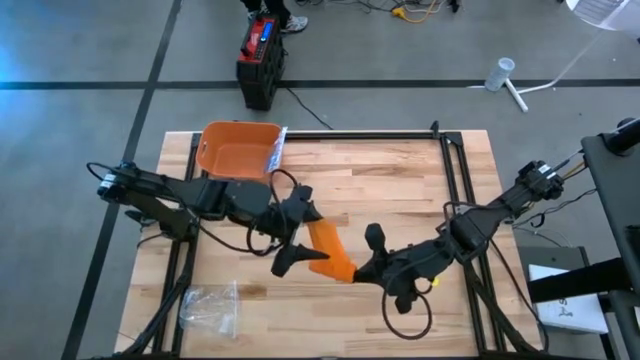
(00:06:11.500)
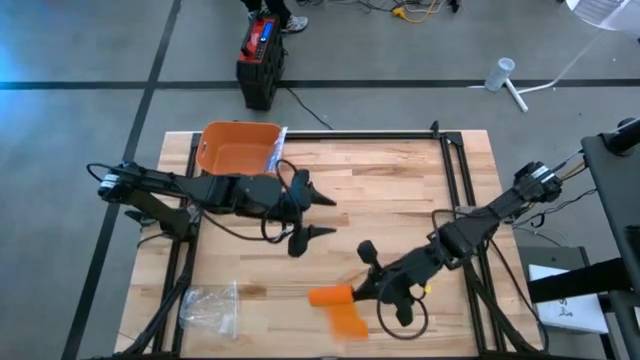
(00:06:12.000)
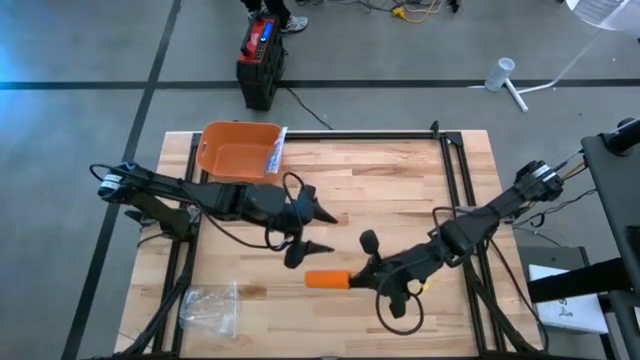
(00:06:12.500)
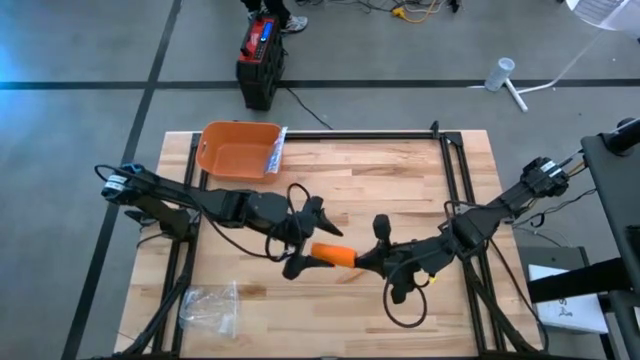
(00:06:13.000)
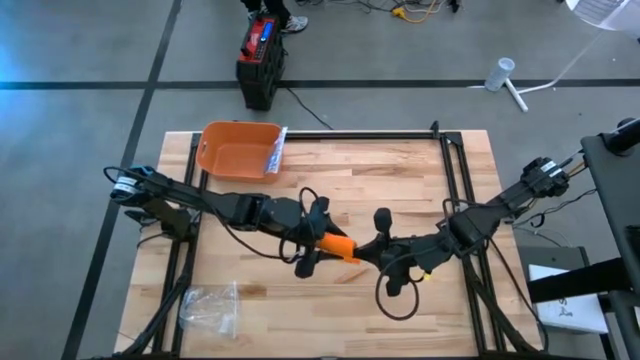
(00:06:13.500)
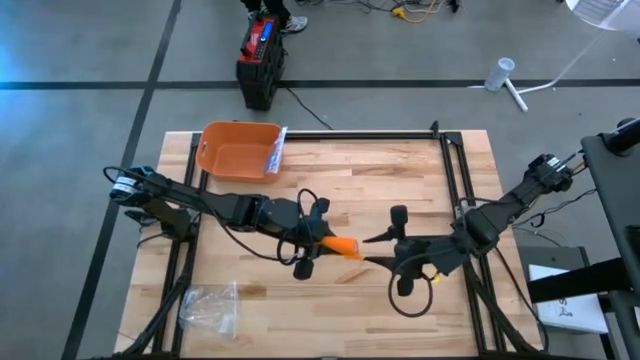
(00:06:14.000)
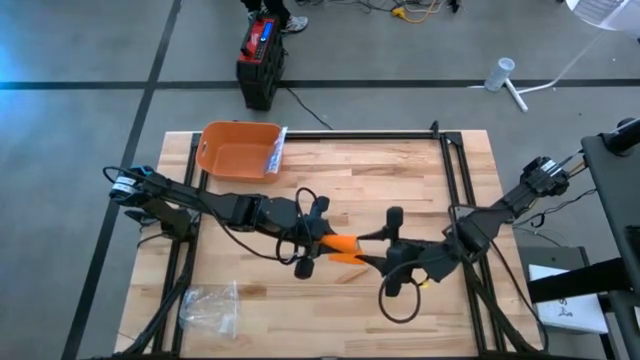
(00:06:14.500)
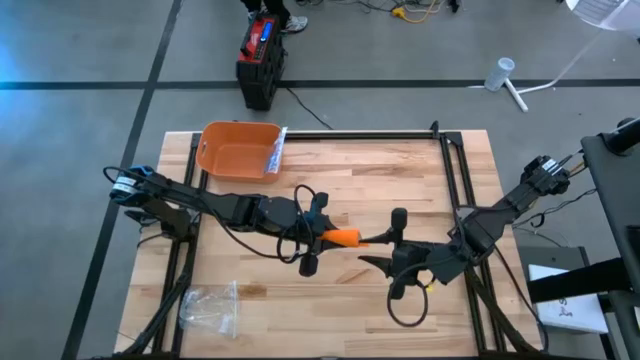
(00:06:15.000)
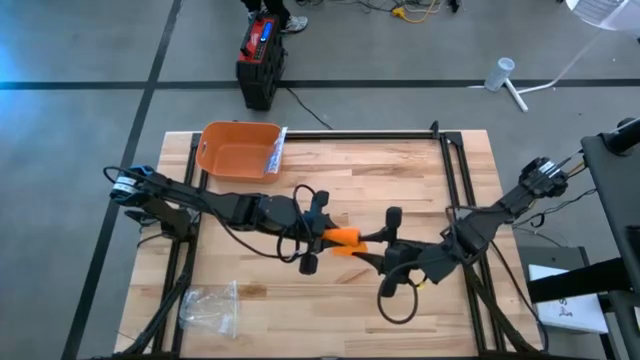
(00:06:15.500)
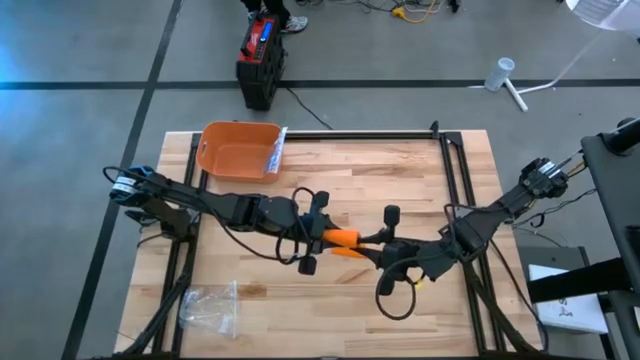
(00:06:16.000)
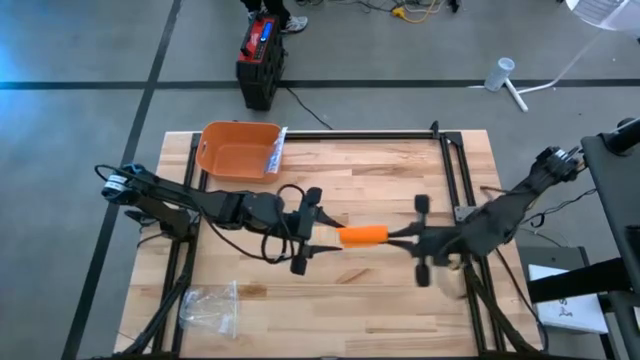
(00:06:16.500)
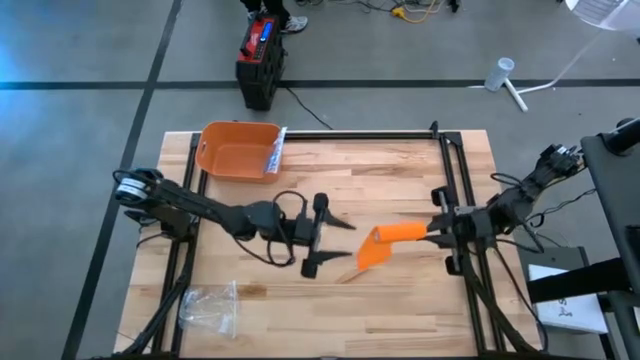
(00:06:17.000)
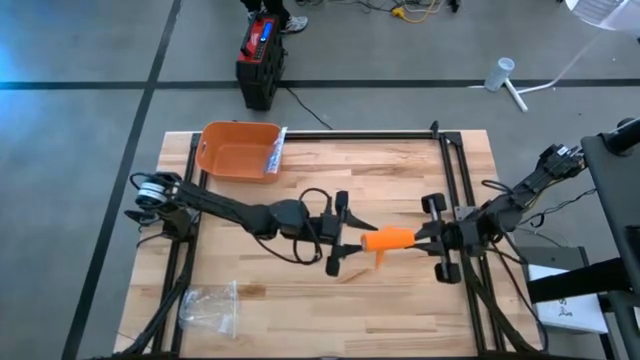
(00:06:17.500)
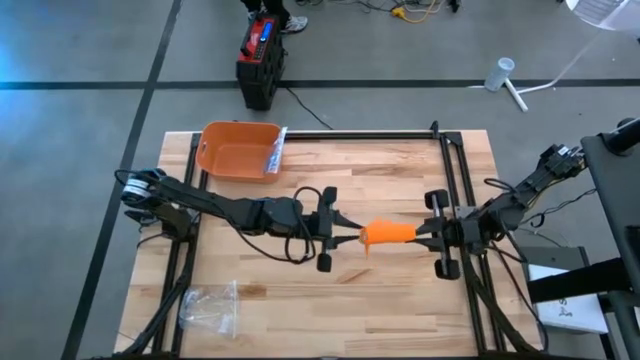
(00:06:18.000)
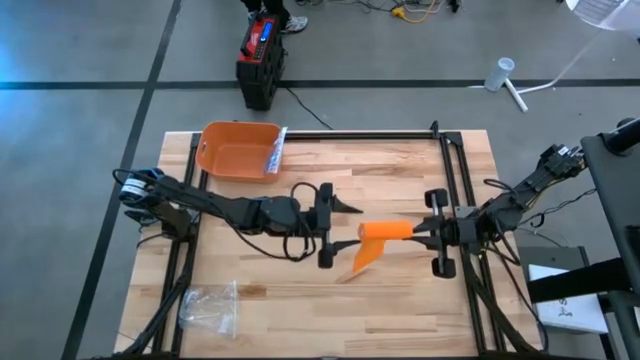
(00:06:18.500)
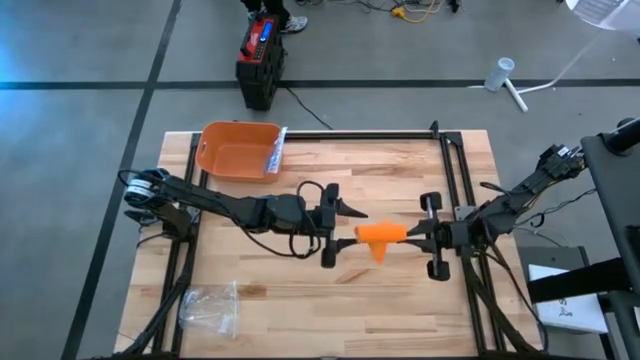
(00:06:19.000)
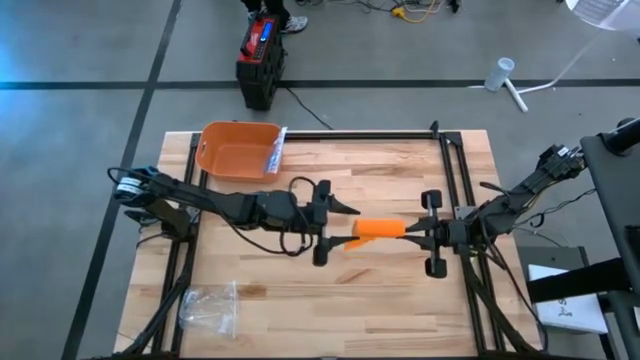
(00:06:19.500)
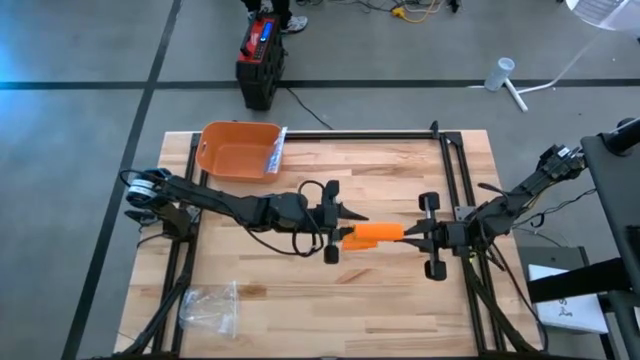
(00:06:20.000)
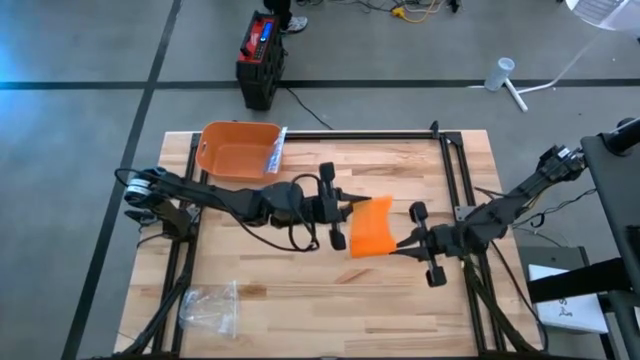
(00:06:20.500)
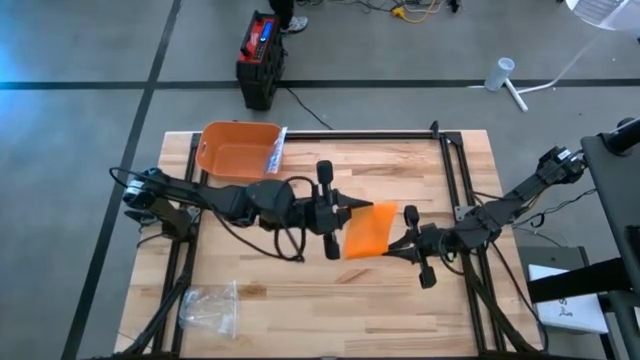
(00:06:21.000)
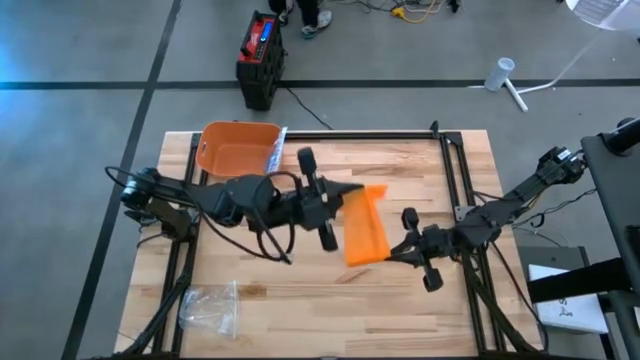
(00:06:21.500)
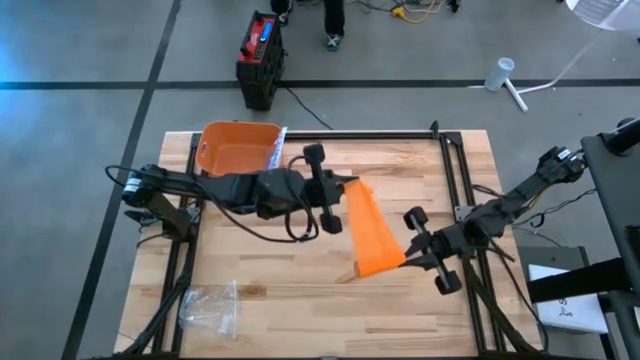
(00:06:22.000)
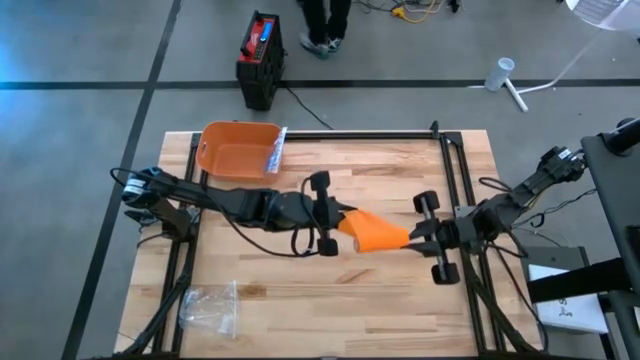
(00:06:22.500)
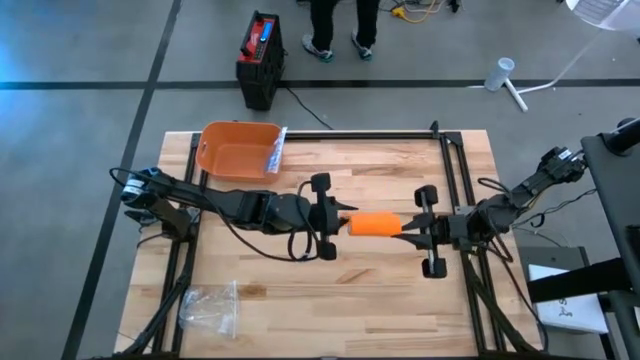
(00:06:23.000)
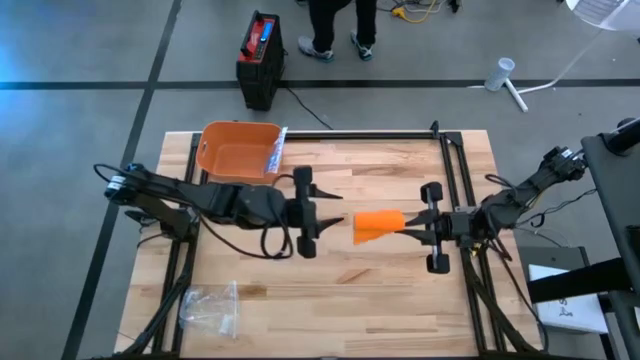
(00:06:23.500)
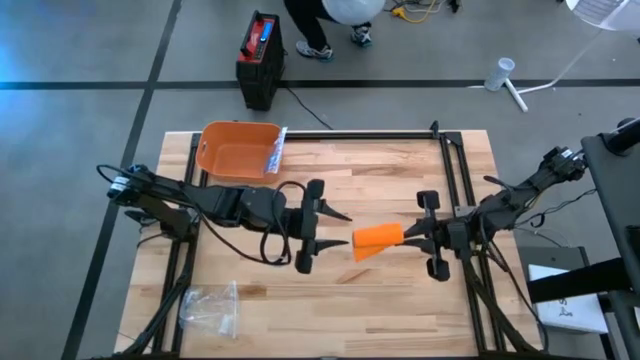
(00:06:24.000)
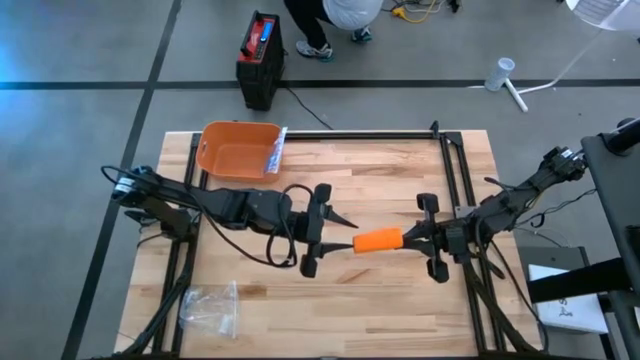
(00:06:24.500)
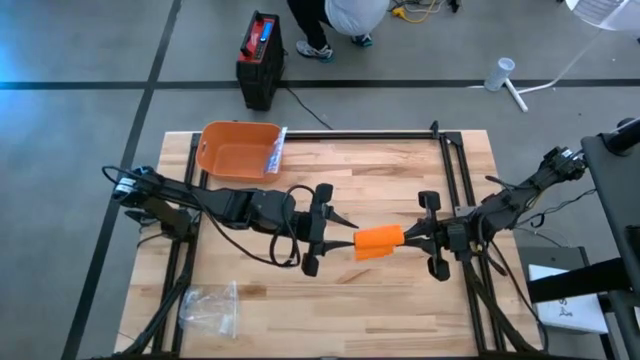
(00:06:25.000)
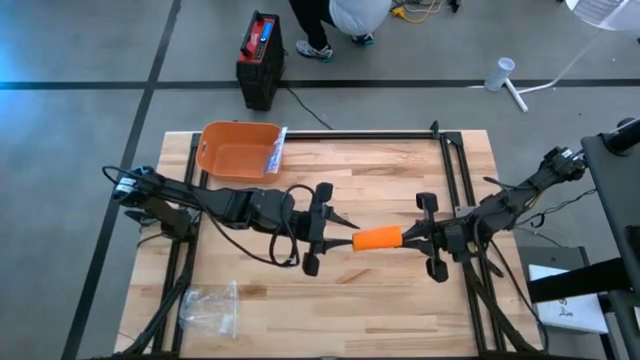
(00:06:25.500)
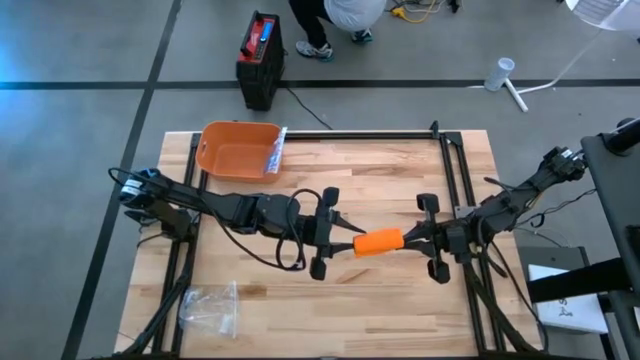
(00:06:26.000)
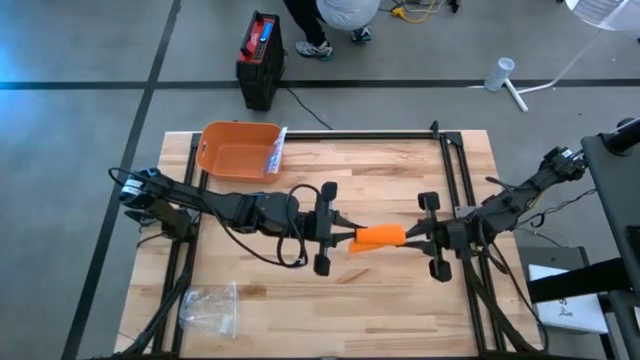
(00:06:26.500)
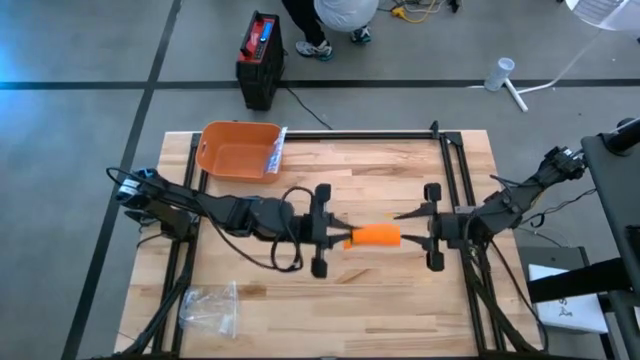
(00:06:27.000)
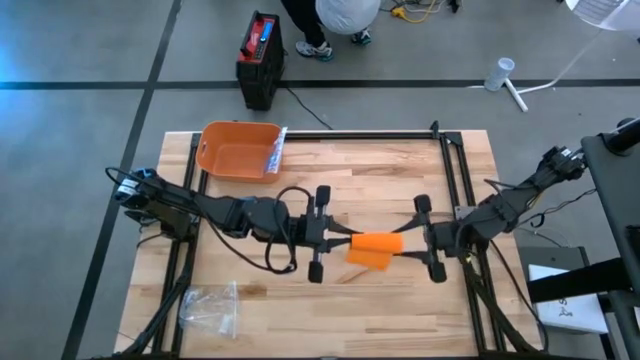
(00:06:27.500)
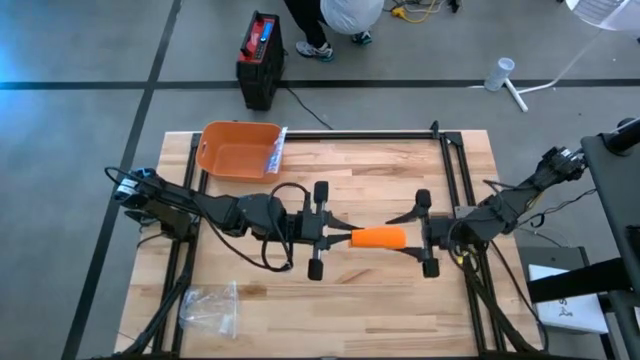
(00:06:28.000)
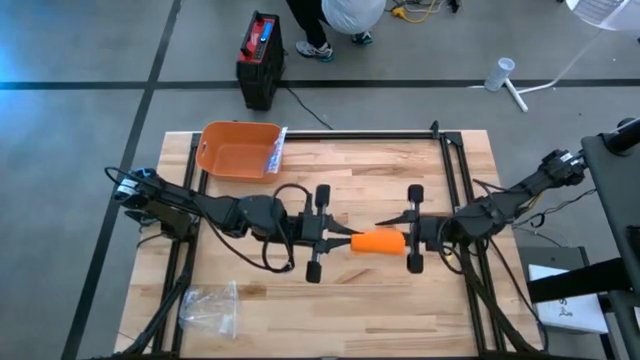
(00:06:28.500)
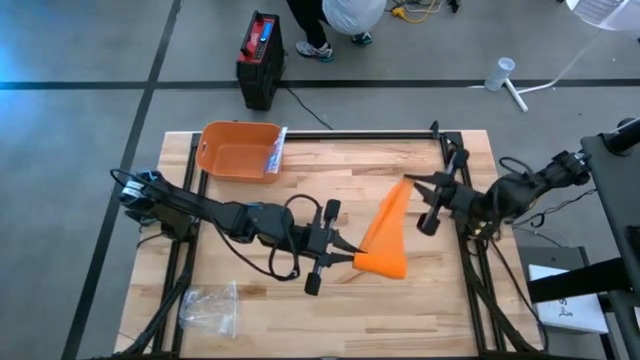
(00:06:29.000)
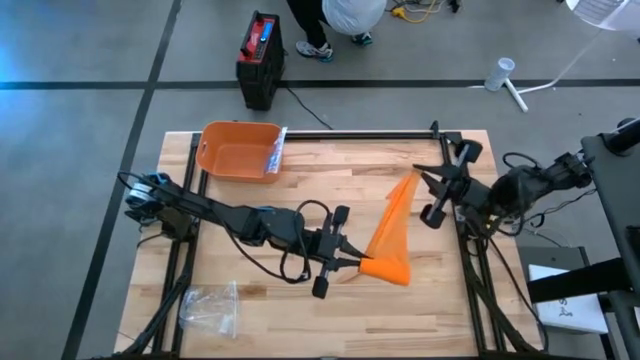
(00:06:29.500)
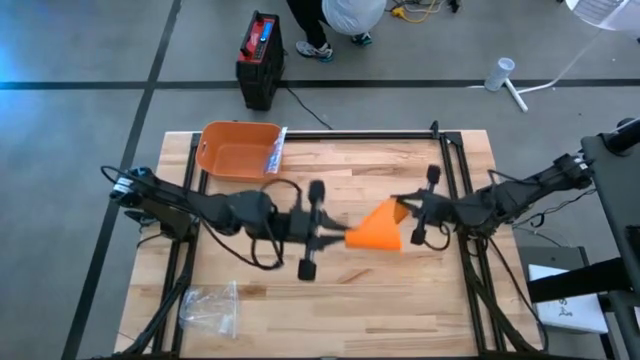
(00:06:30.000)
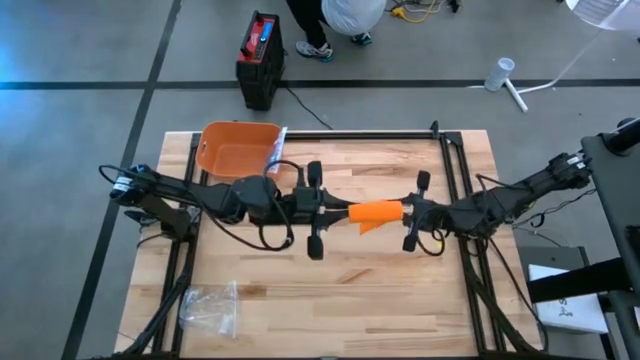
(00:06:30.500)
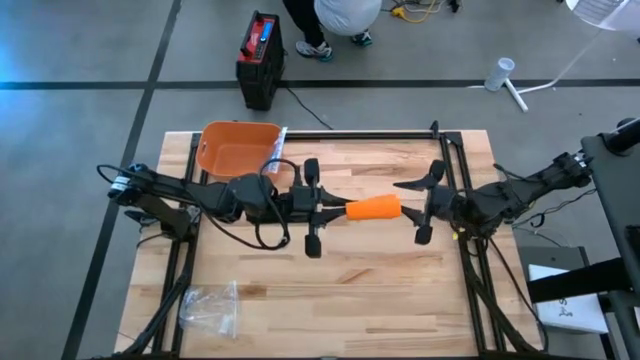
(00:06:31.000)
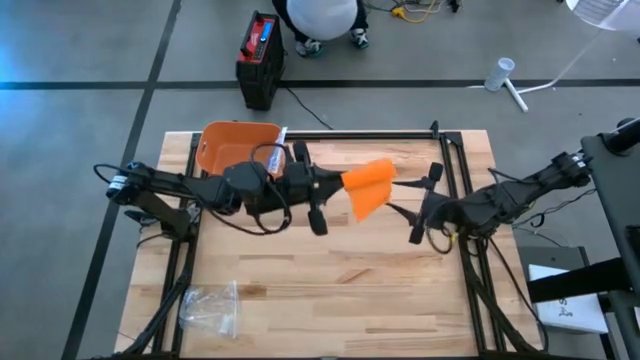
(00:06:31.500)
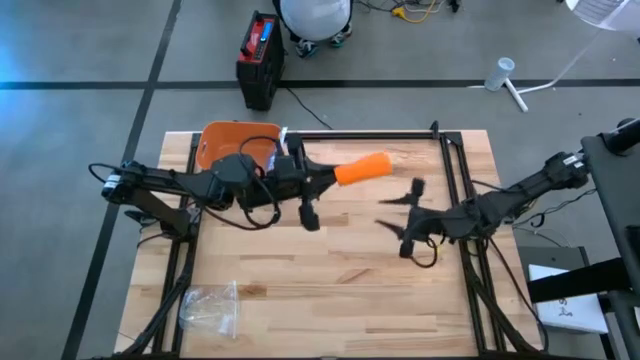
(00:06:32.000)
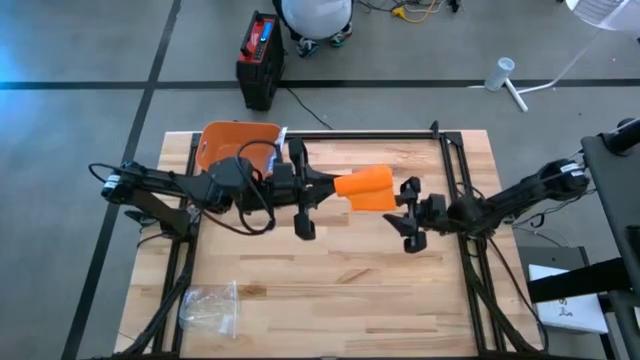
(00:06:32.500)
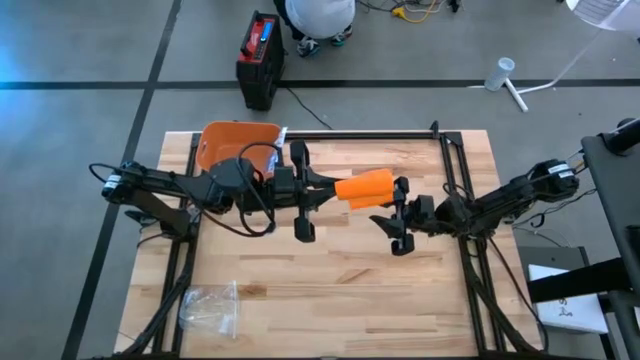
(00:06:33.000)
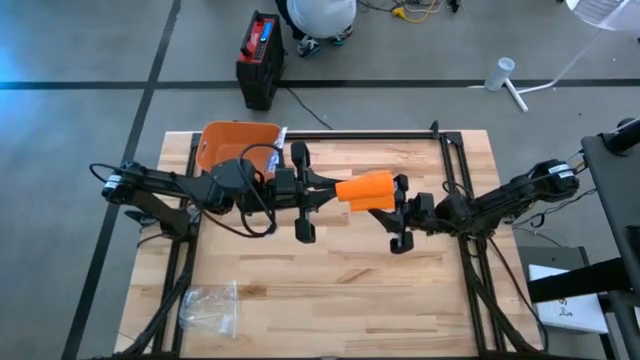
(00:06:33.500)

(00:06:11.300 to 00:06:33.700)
Task: Roll bandage
Roll the orange bandage
